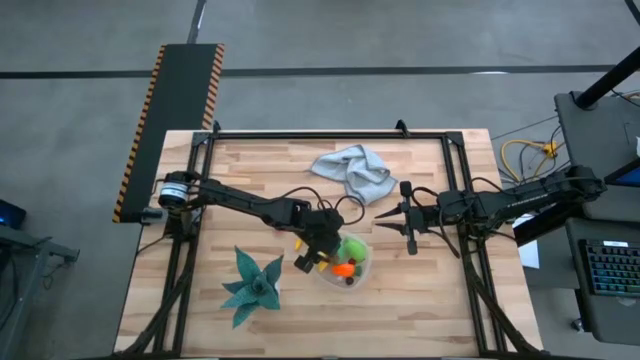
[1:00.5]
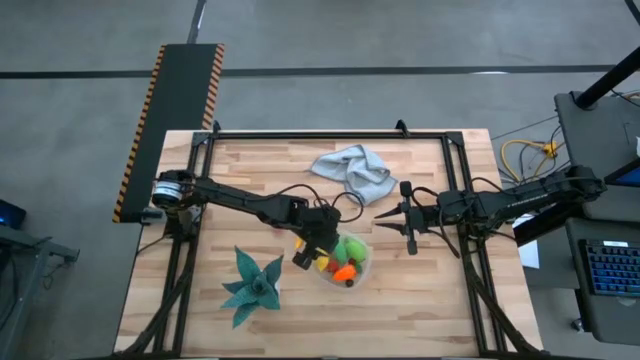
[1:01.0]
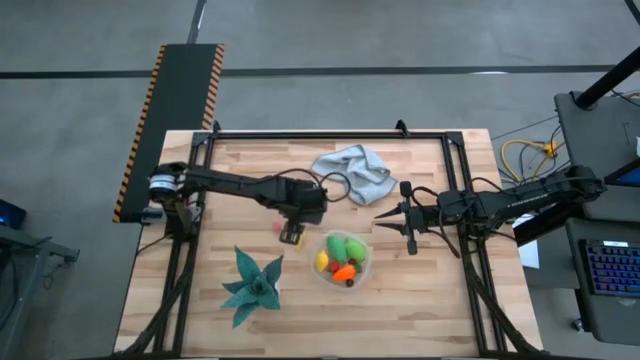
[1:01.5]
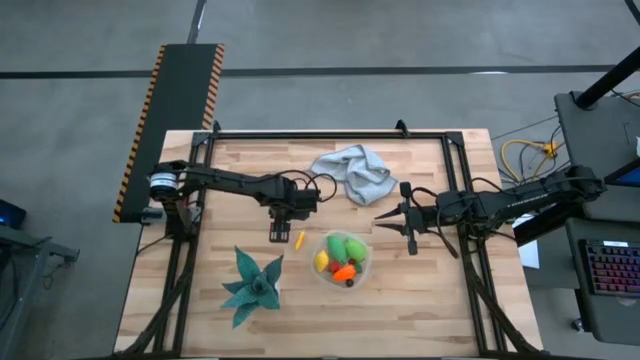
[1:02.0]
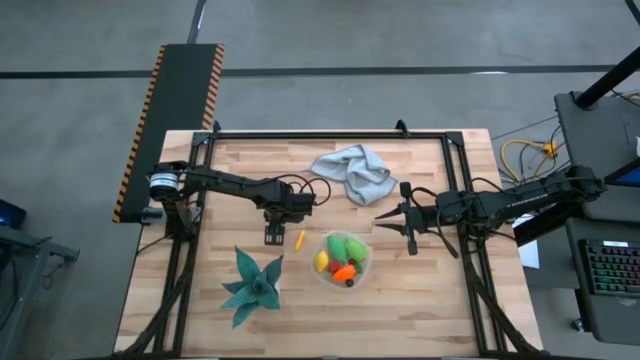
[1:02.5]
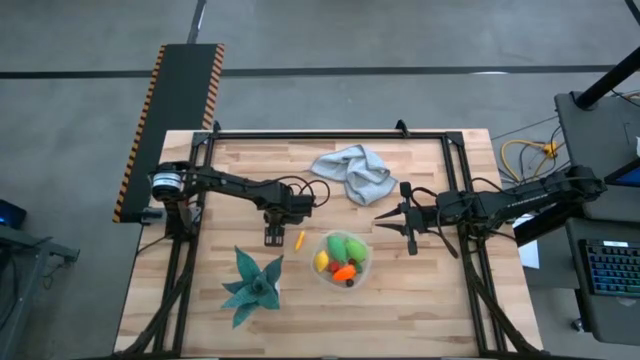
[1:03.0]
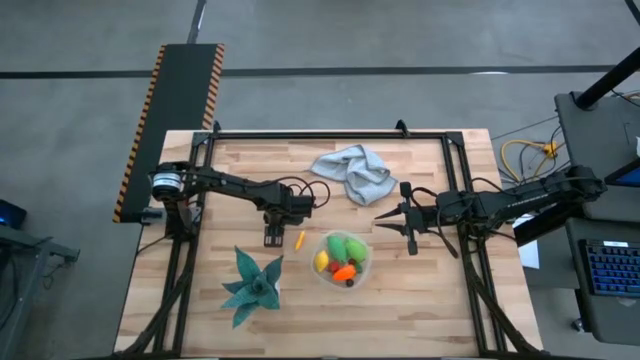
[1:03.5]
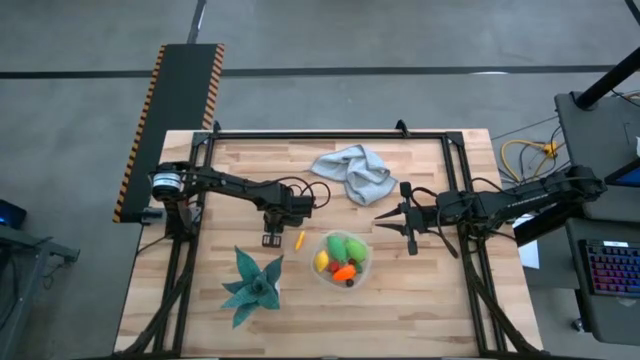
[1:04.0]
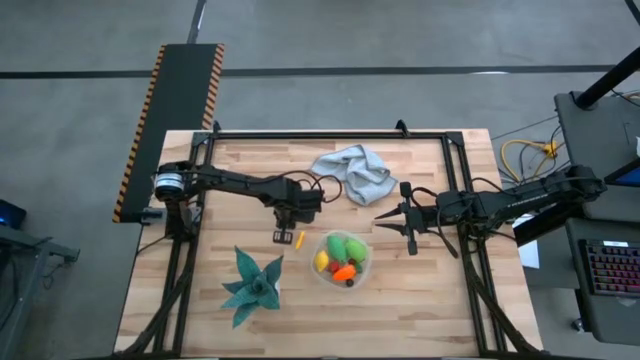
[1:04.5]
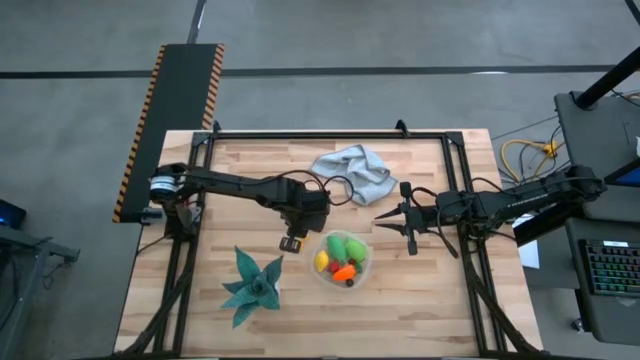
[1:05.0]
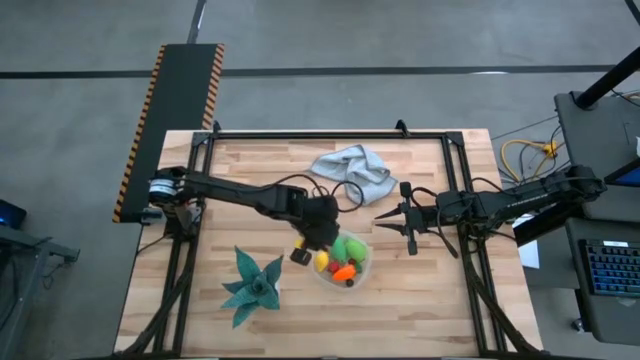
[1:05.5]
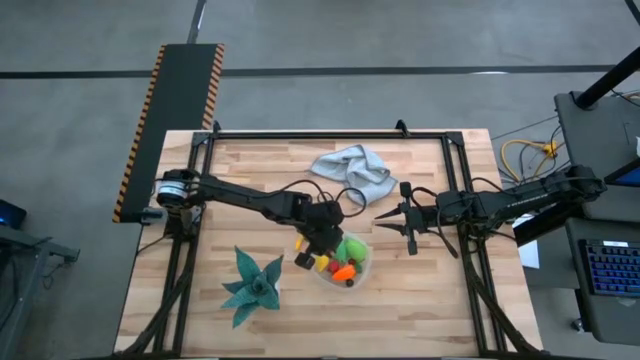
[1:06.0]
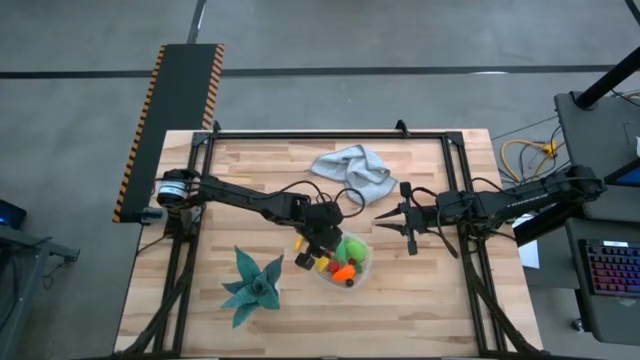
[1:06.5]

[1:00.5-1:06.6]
Task: Pick and placing Produce into tupperware
Put the apricot into the container

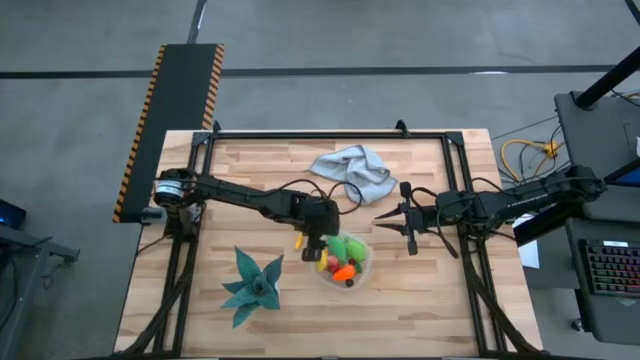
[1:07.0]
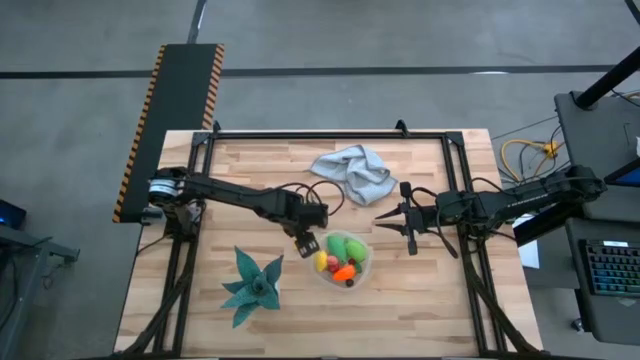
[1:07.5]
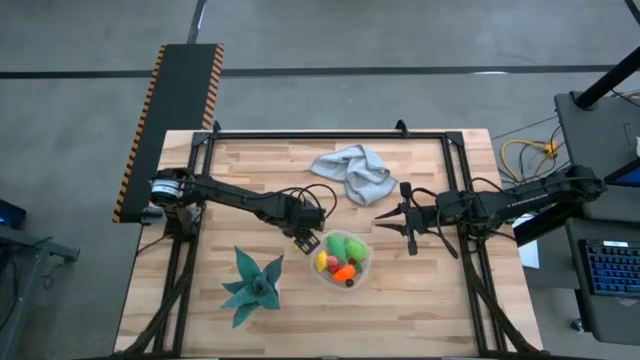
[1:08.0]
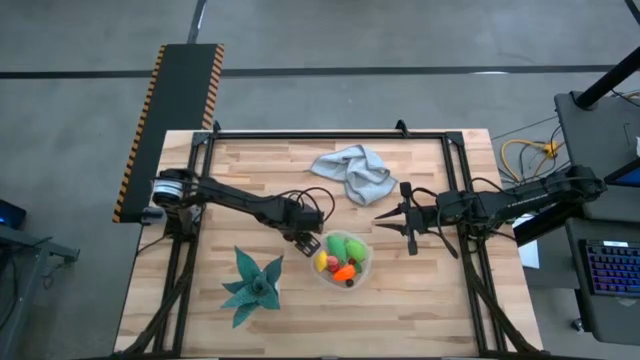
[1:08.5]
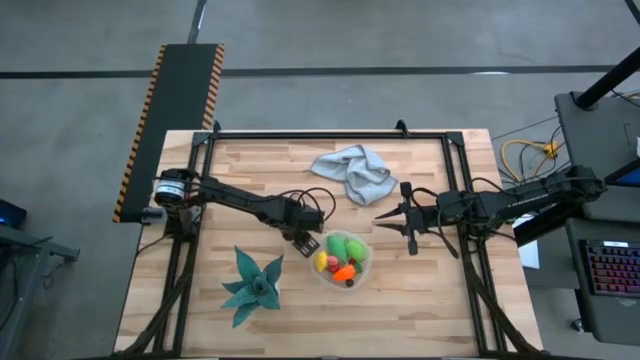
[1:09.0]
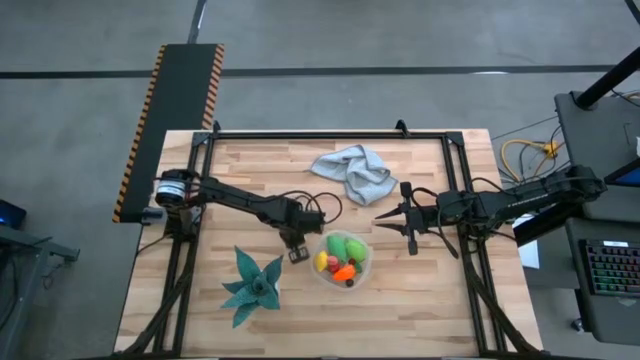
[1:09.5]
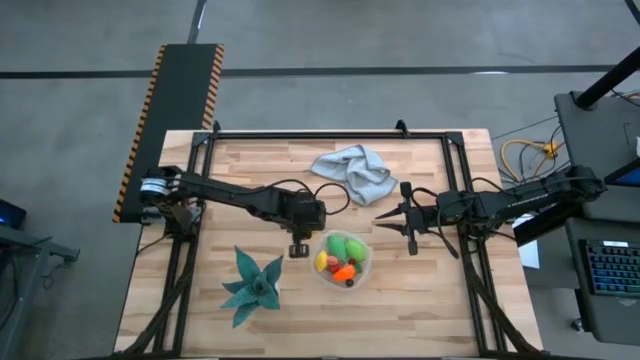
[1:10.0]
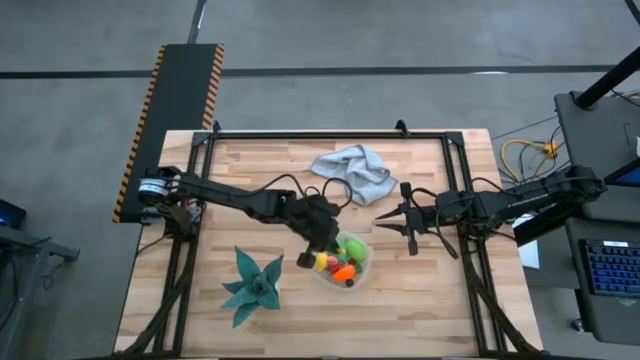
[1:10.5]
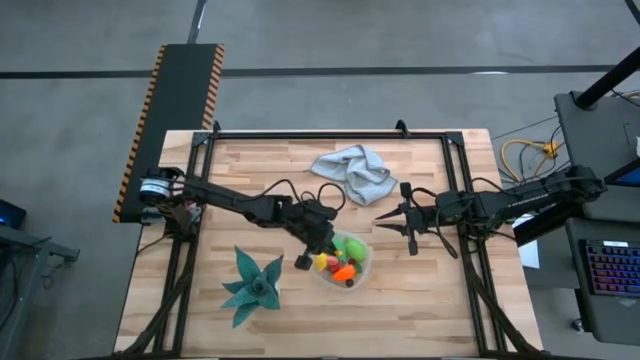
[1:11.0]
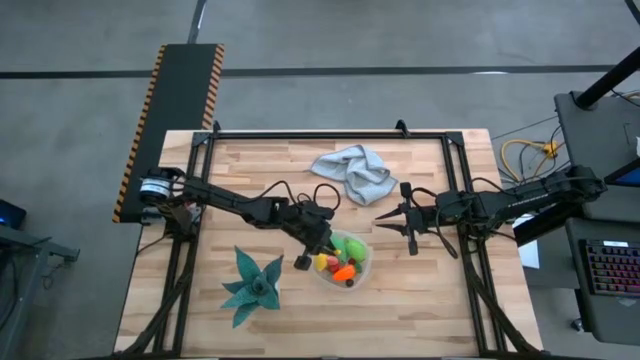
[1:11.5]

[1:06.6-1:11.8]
Put the corn into the container

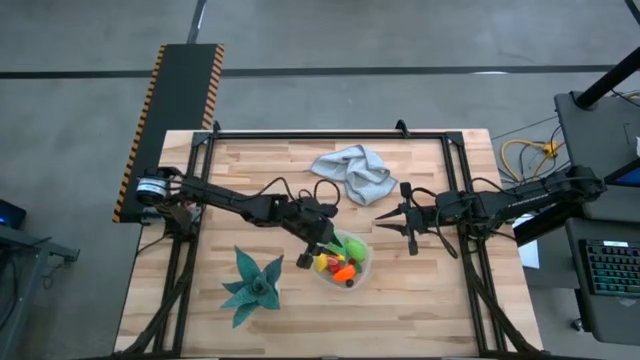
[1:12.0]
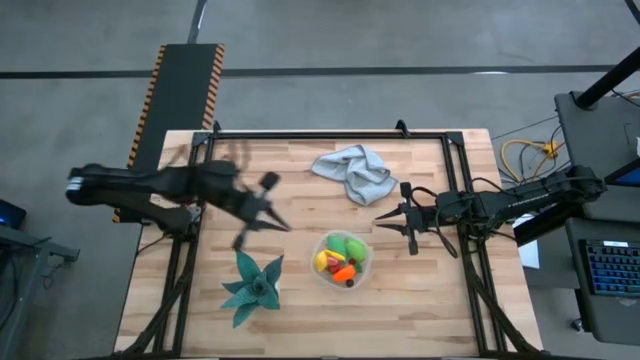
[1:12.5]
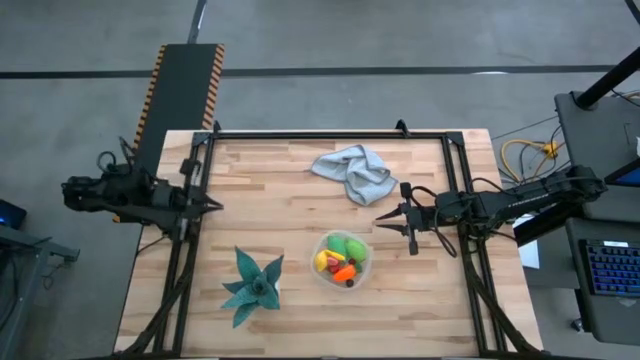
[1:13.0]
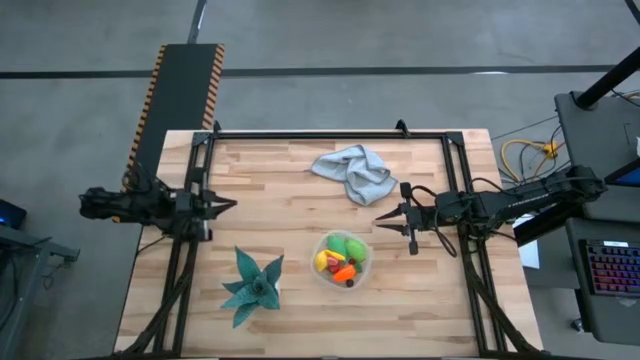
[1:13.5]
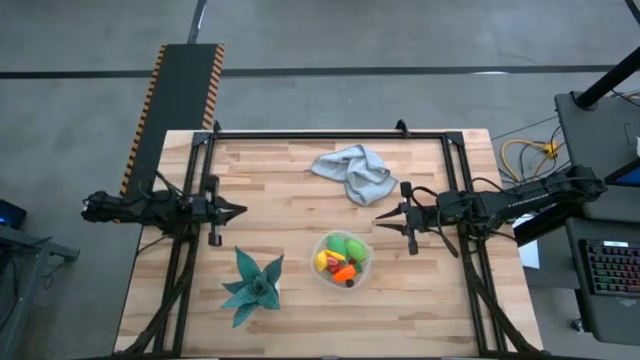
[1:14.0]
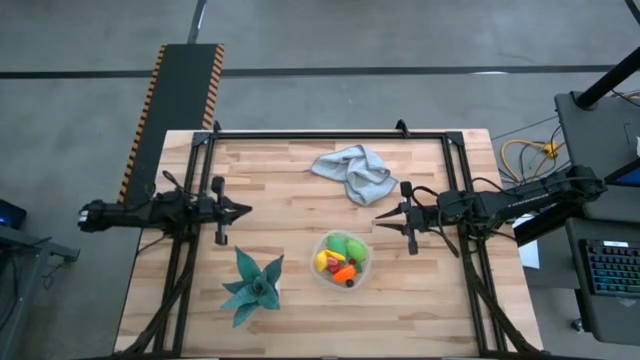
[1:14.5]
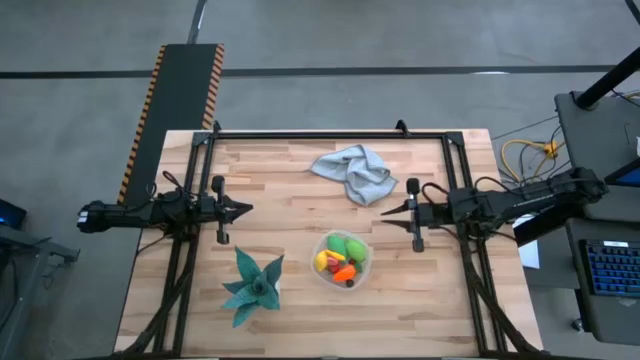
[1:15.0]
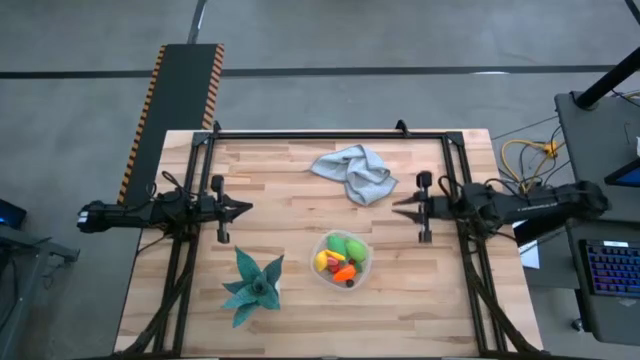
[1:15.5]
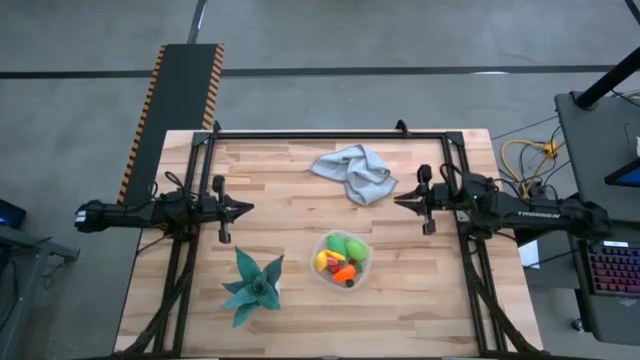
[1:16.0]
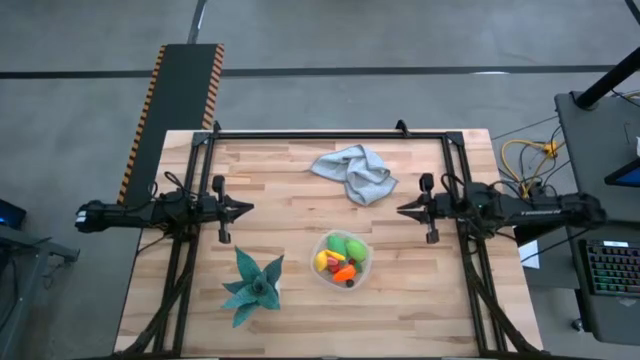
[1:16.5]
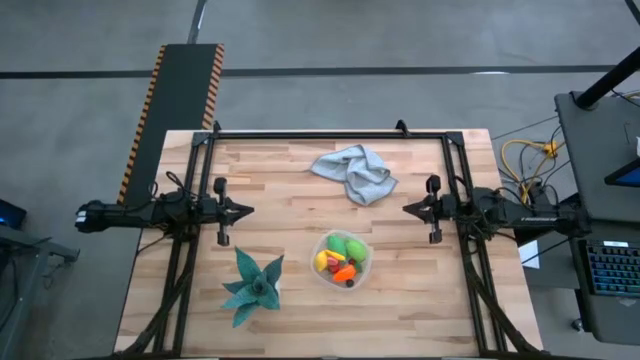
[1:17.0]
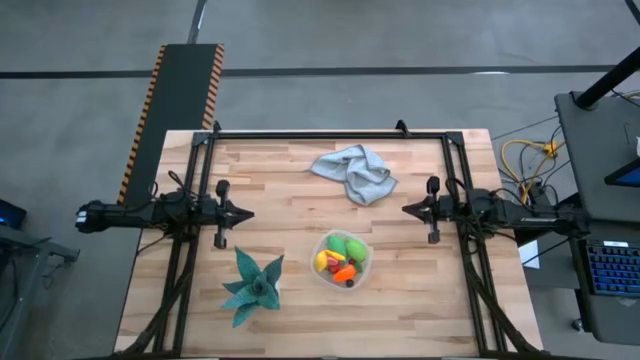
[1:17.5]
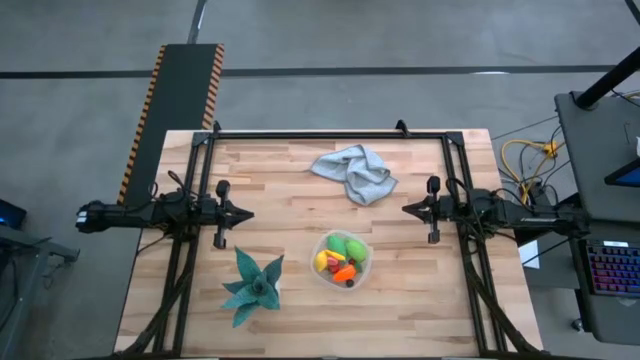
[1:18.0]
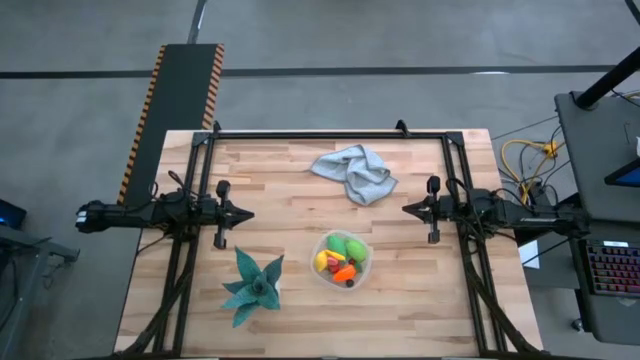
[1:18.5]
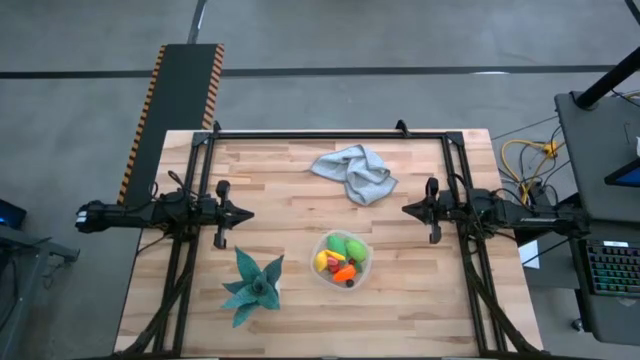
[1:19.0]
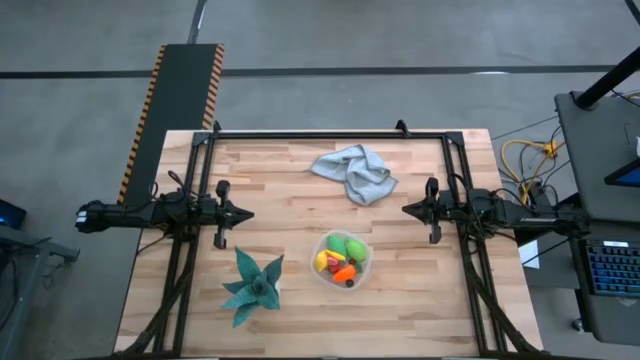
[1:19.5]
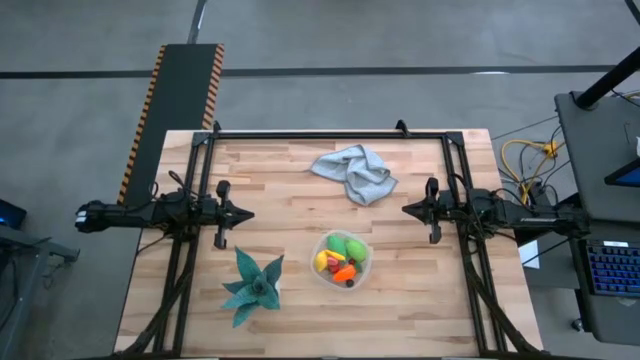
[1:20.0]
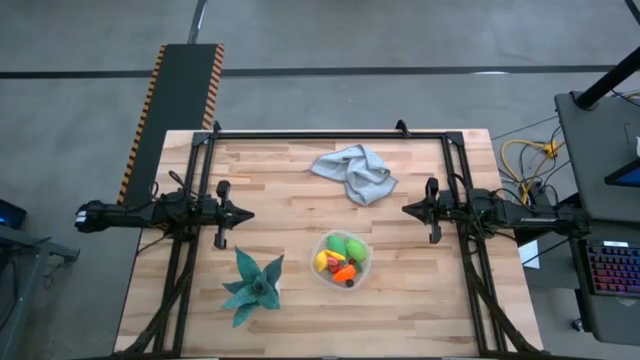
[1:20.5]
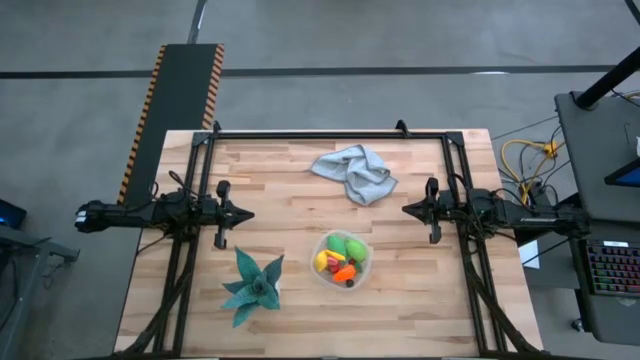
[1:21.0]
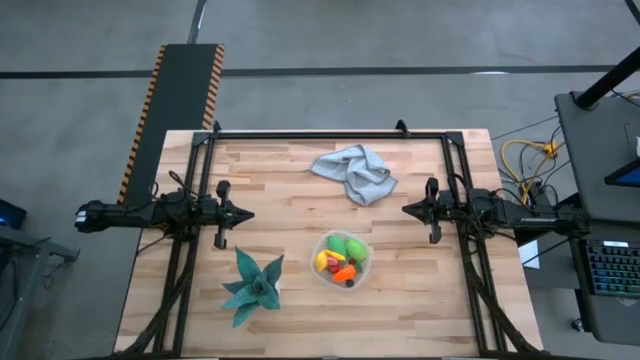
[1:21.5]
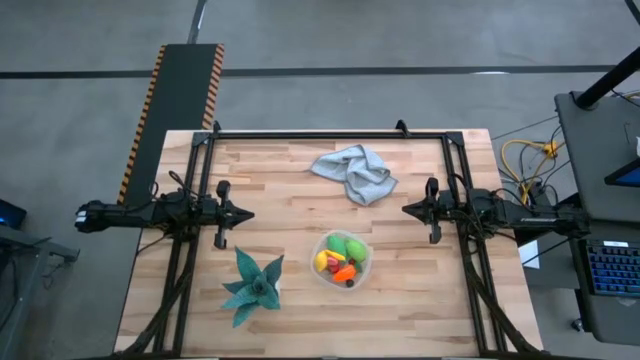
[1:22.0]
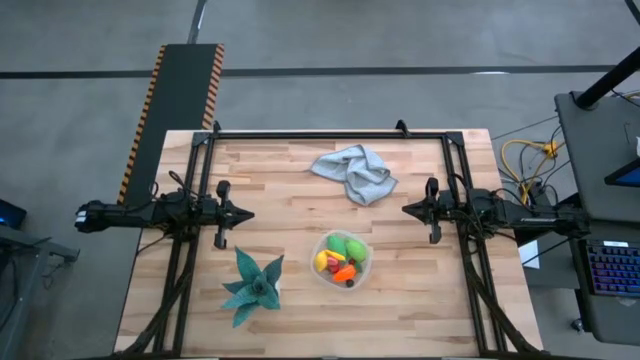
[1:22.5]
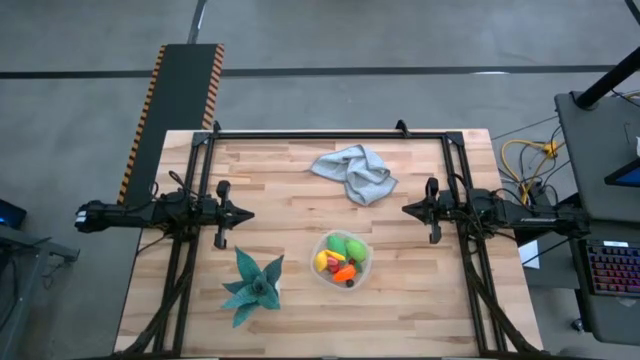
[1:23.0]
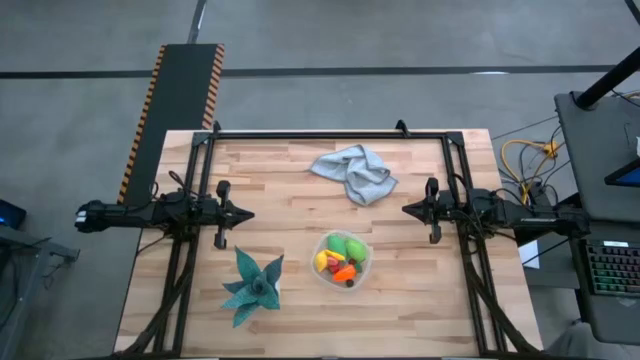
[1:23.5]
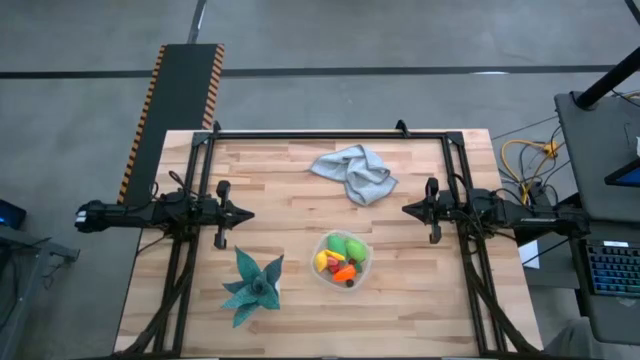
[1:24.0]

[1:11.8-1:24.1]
Return to home position
